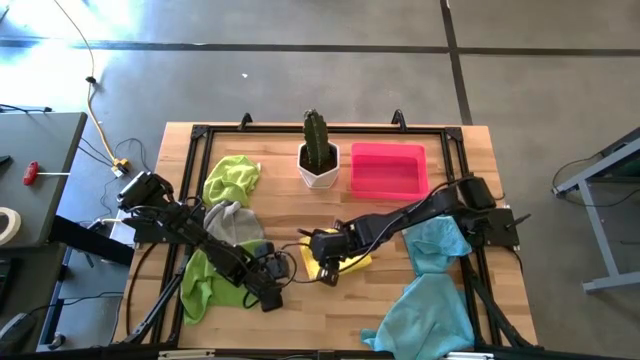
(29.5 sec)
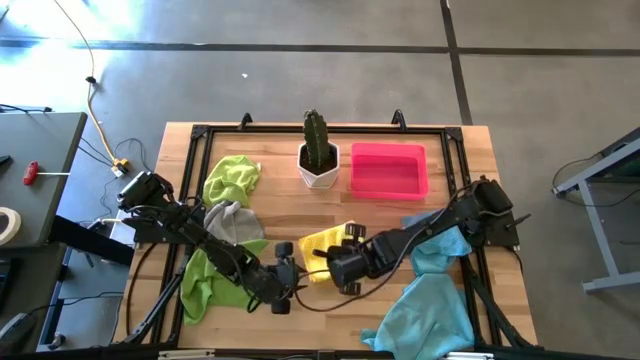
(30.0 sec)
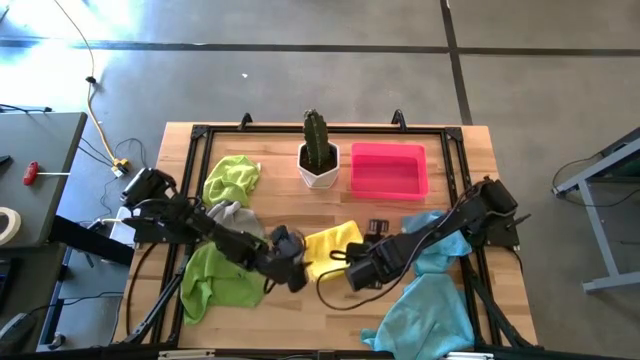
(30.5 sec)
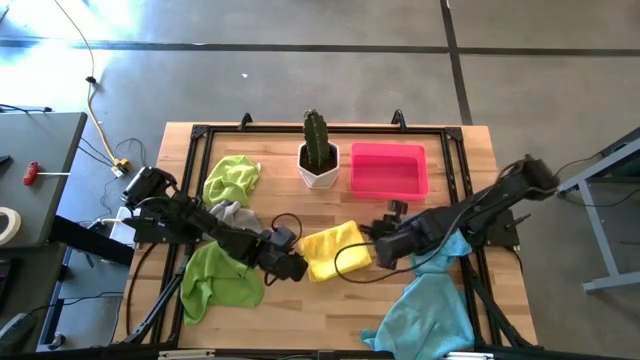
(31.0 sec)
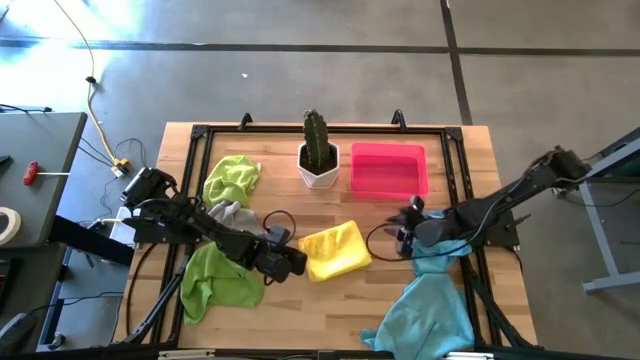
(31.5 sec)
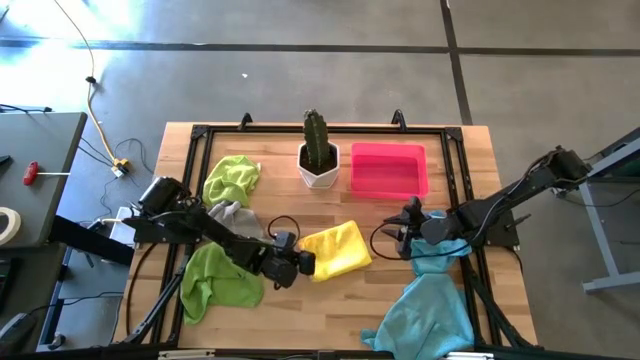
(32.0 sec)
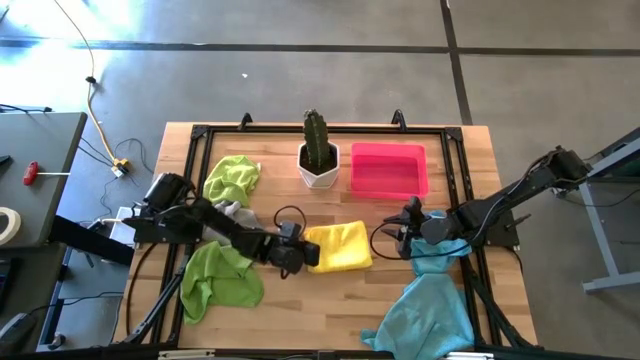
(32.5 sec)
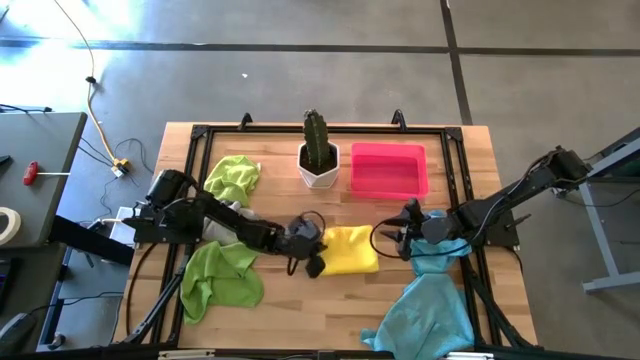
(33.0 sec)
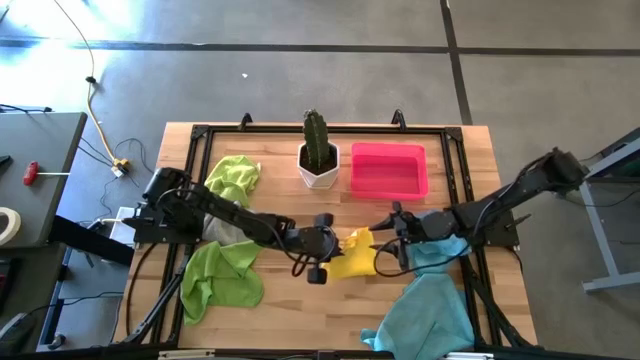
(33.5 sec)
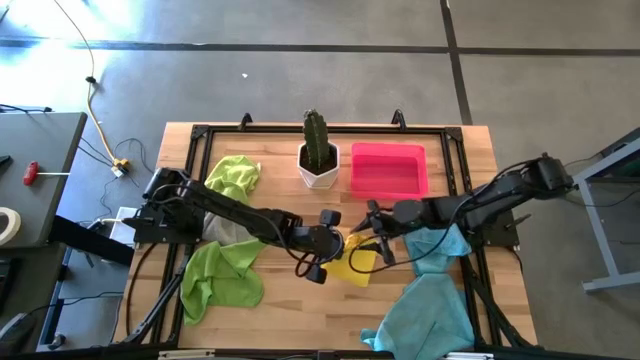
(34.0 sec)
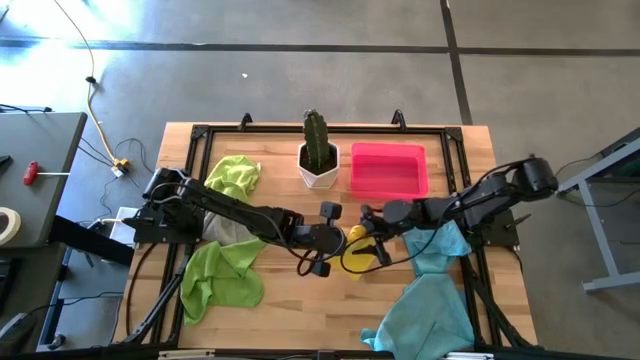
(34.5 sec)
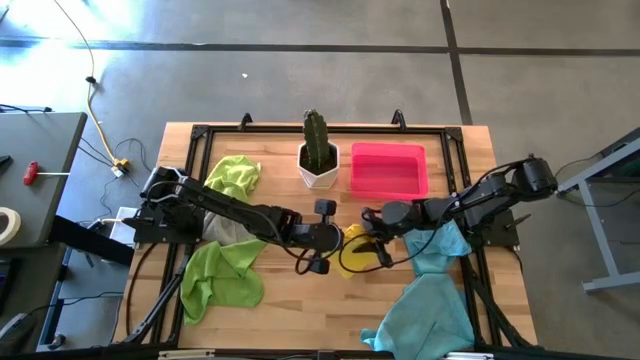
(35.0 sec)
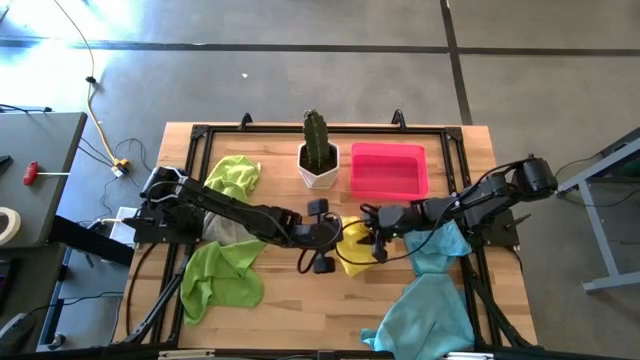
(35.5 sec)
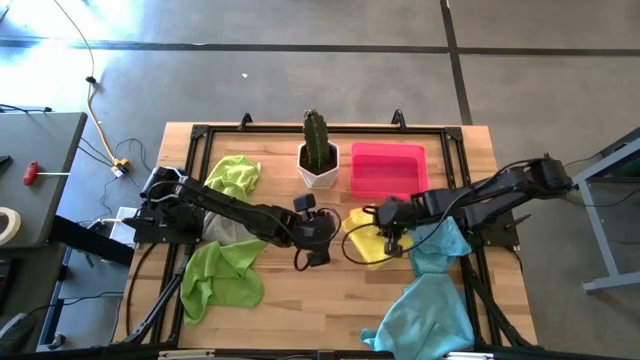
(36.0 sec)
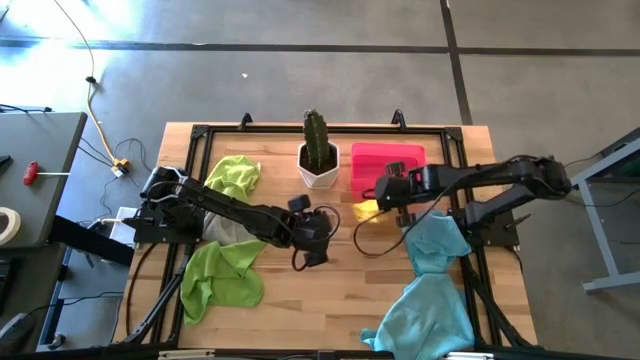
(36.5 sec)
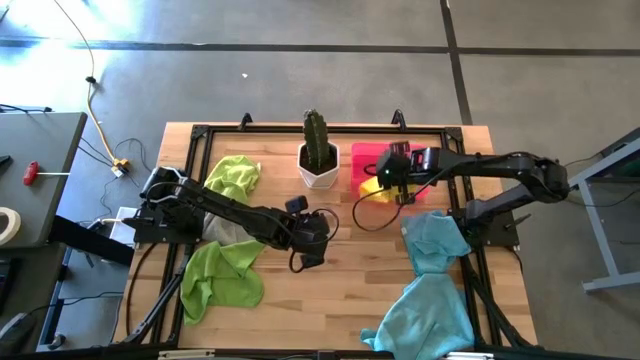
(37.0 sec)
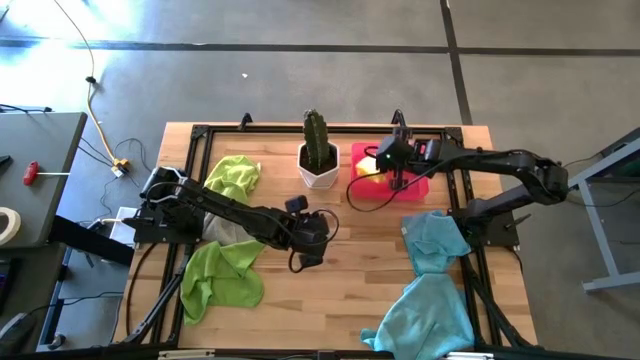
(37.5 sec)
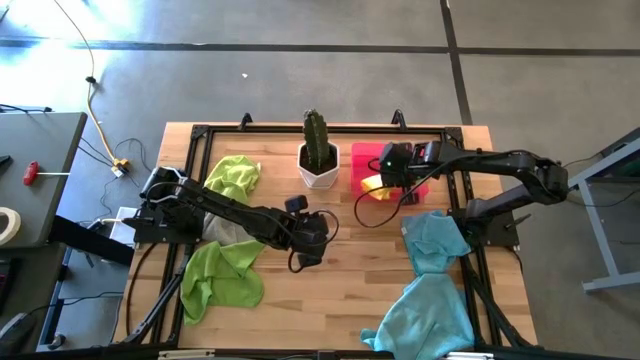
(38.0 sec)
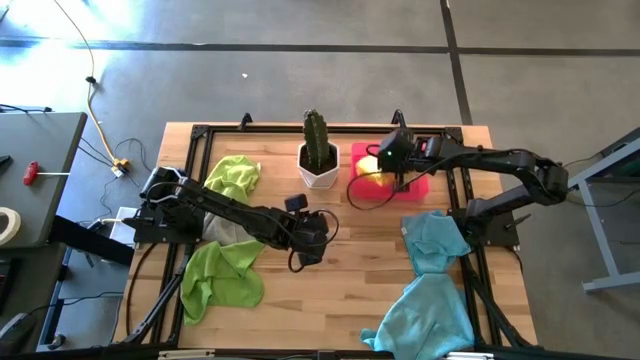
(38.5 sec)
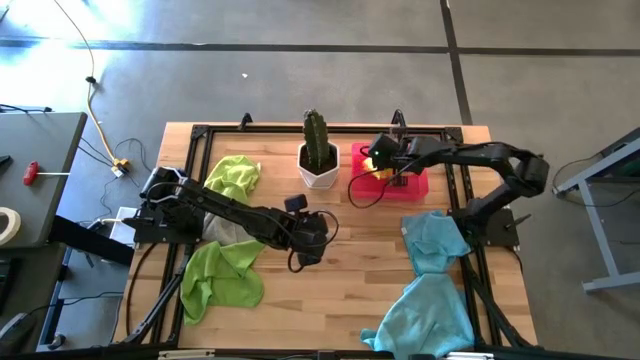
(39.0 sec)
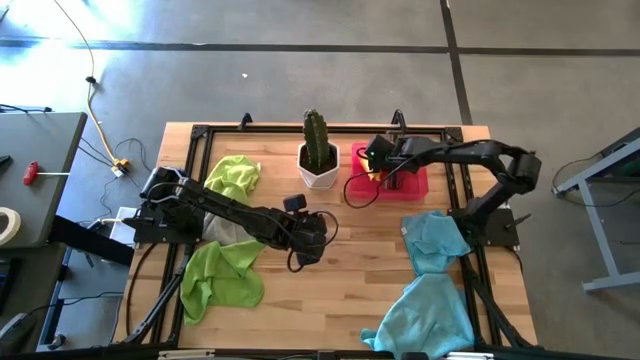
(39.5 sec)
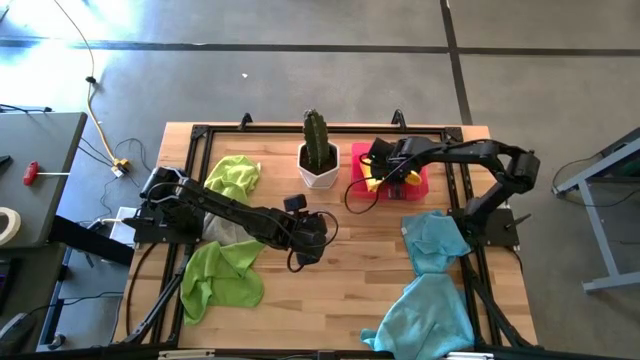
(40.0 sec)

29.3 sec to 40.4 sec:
Task: Fold microfiber towels
Put the yellow microfiber towel into the red bin

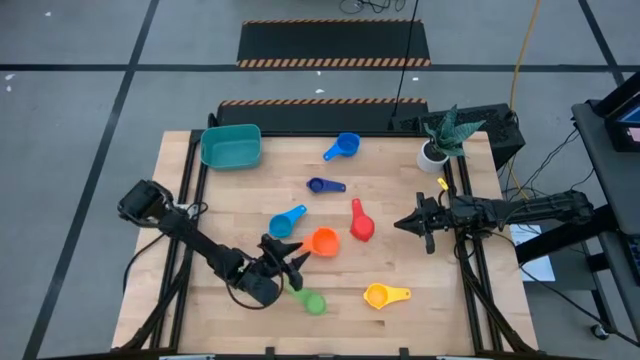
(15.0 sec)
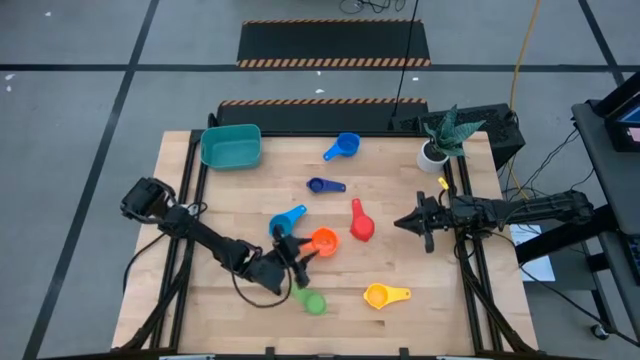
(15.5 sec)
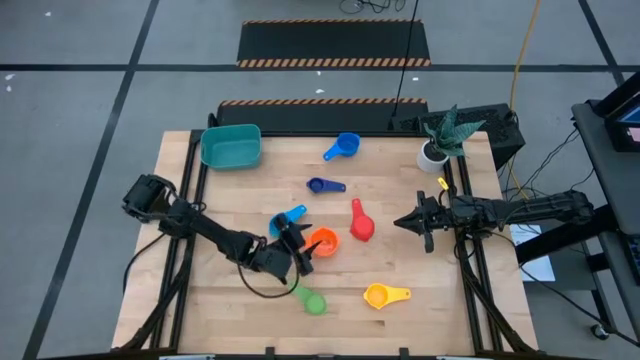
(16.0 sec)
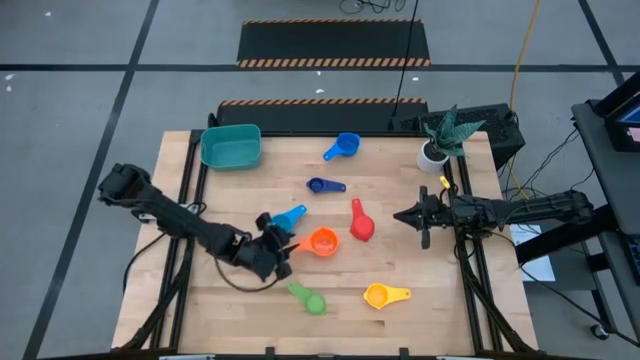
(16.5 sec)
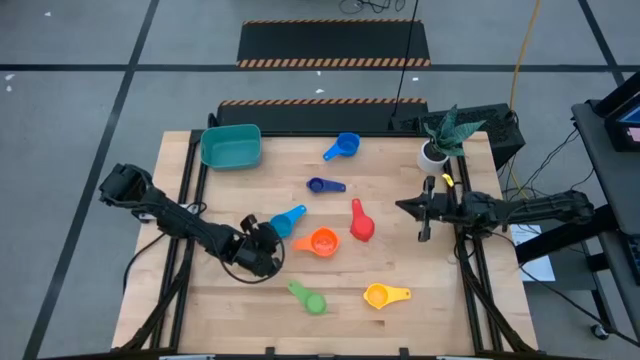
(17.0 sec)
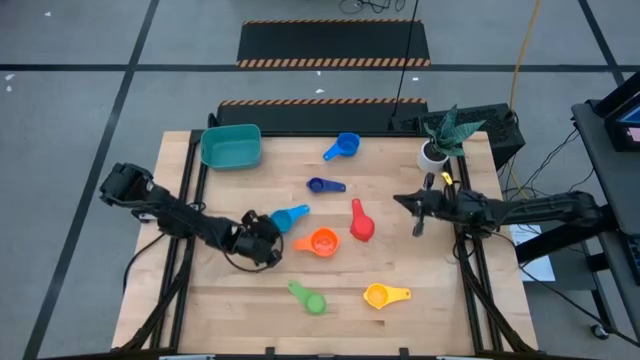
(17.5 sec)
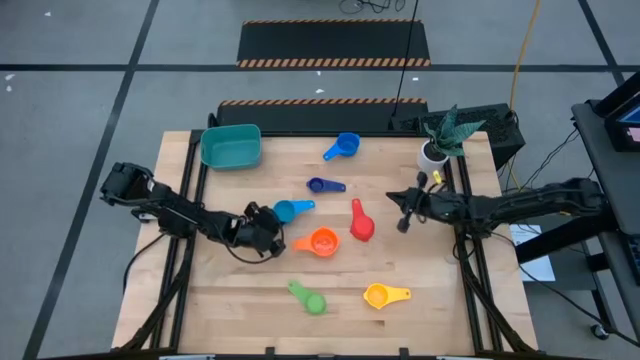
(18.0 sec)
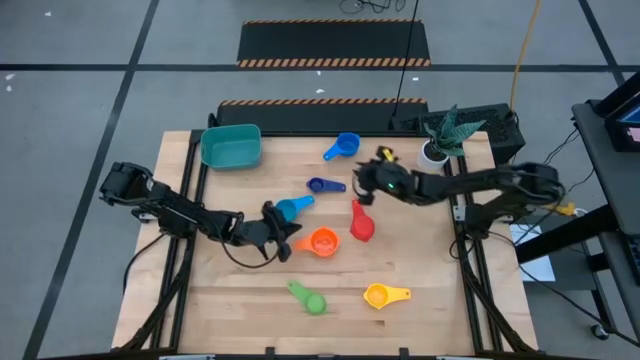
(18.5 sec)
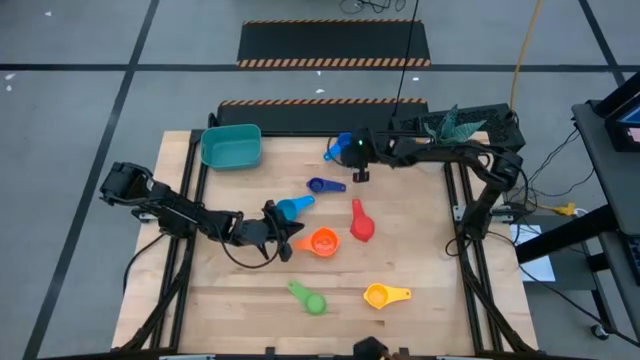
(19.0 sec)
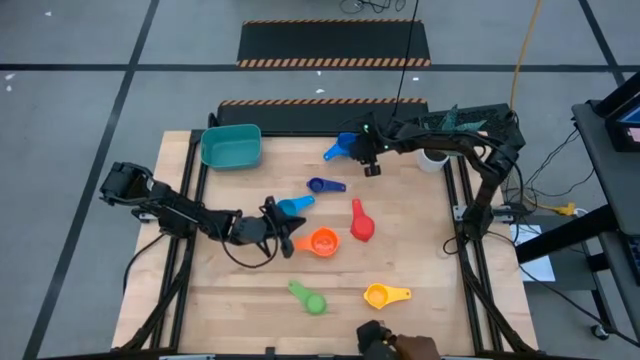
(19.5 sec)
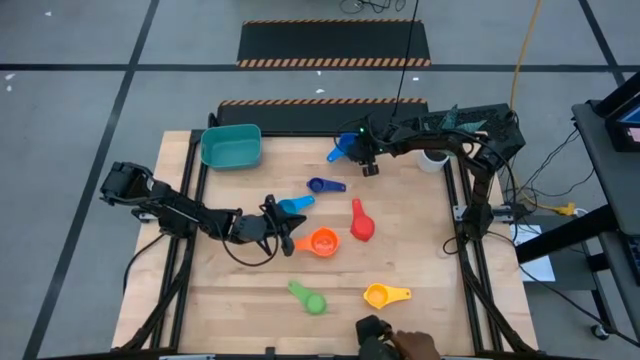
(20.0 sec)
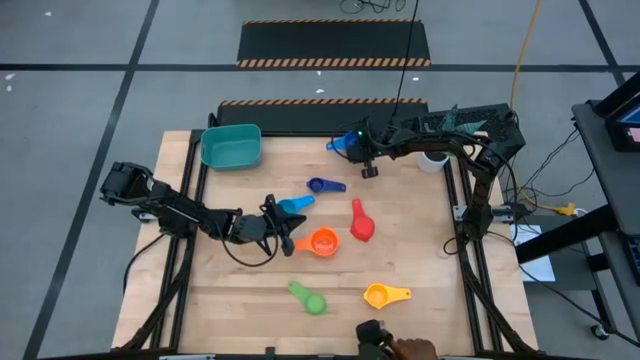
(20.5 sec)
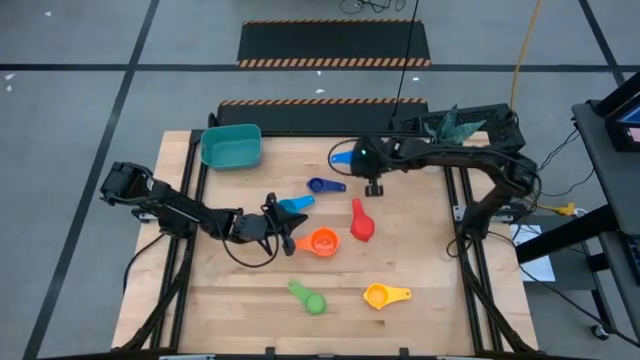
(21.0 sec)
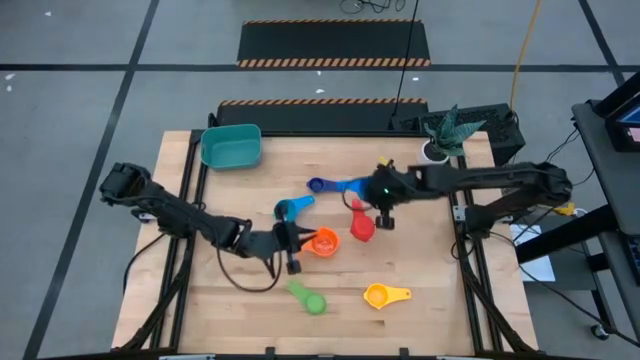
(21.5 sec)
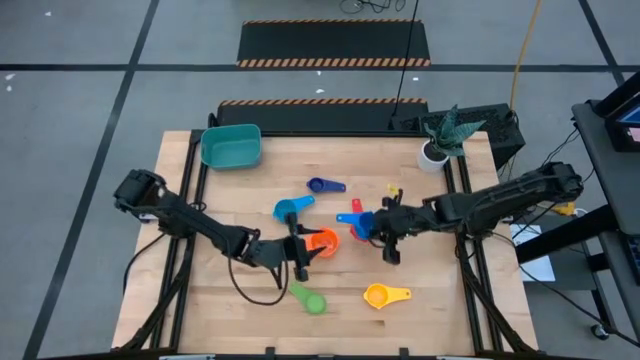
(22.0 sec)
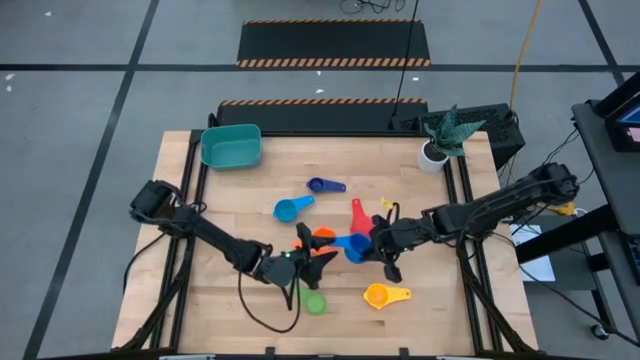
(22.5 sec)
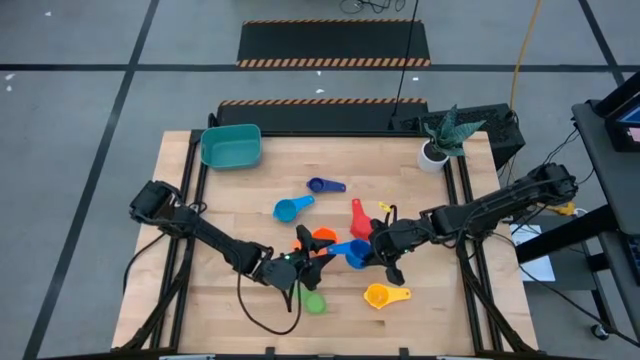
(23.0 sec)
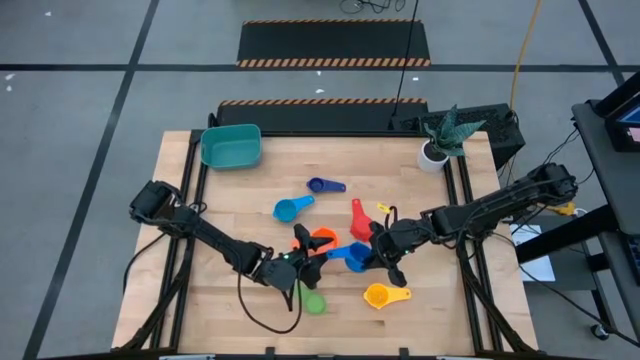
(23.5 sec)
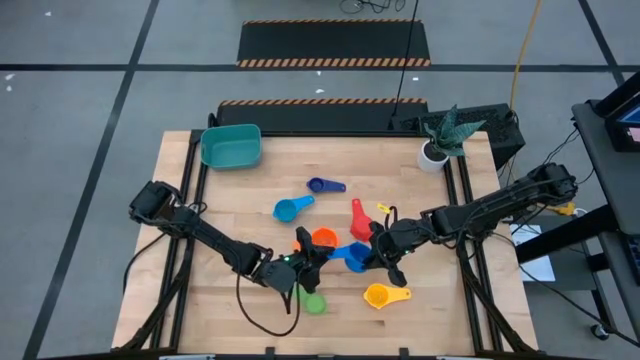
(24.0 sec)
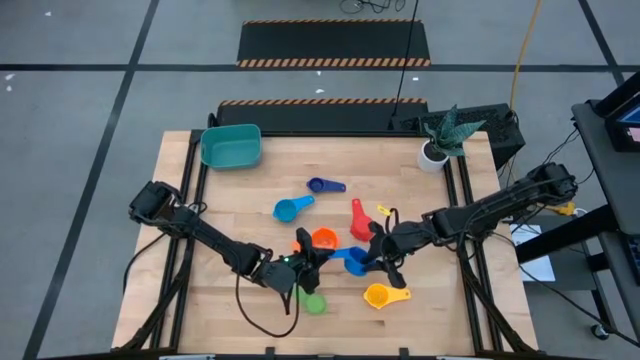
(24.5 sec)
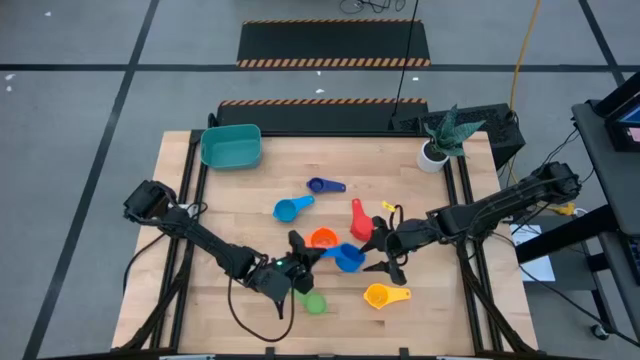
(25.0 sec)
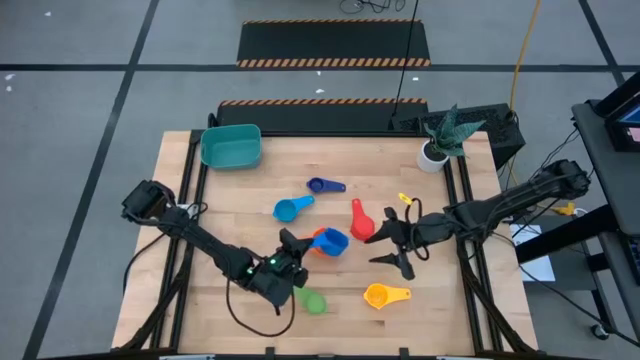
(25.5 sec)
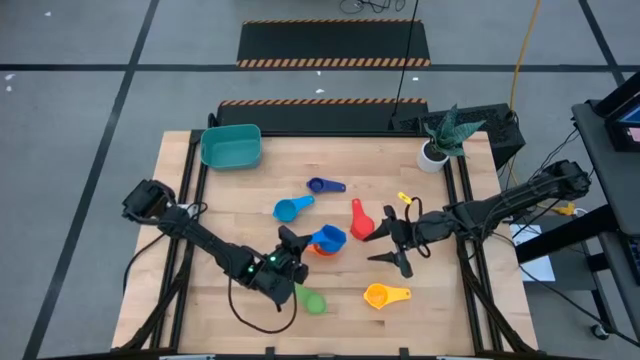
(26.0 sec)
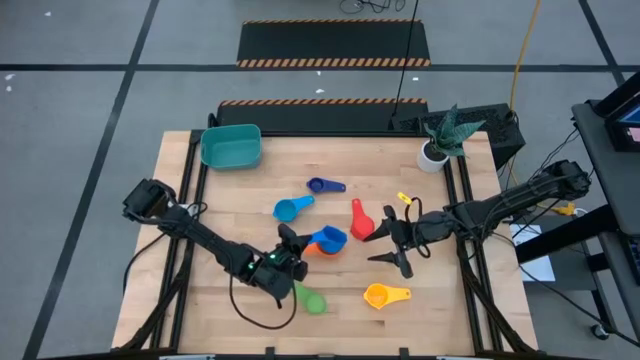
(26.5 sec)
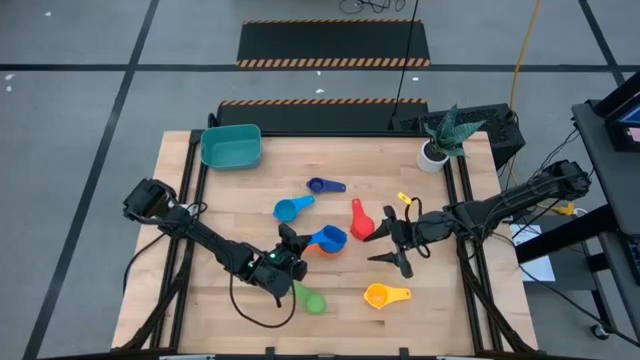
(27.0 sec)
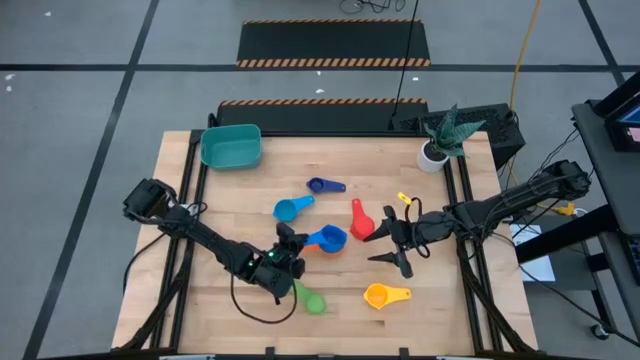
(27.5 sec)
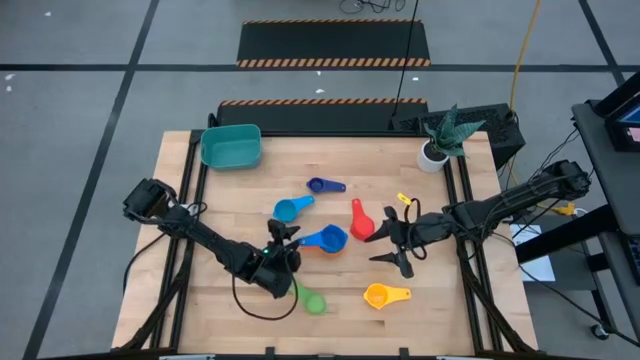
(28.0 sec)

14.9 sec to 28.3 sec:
Task: Nest measuring cups in basket
Stack the blue measuring cup on top of the orange measuring cup
